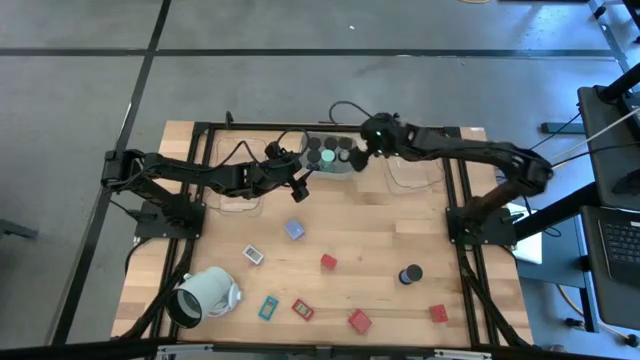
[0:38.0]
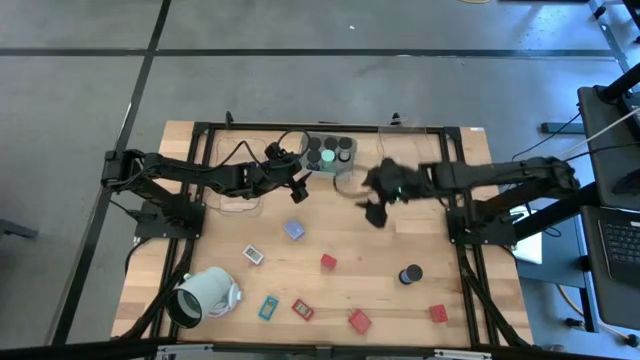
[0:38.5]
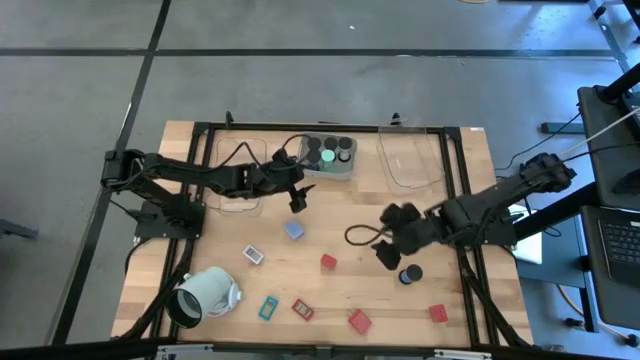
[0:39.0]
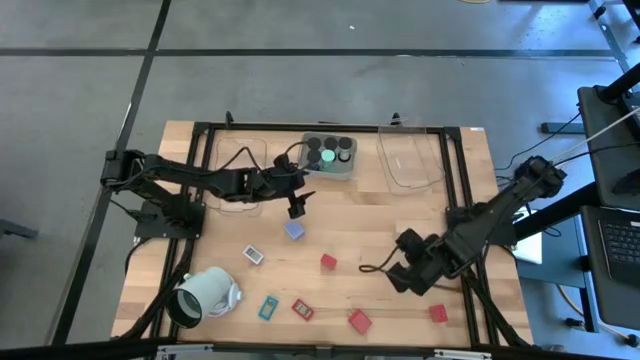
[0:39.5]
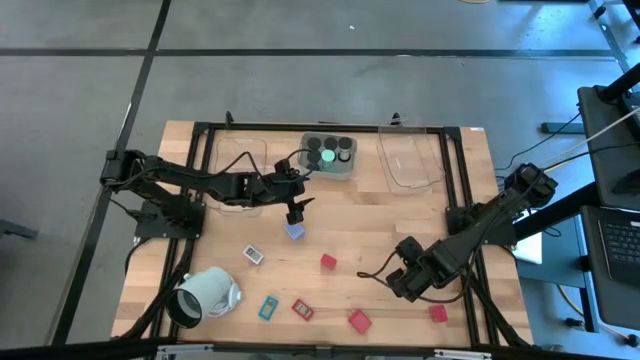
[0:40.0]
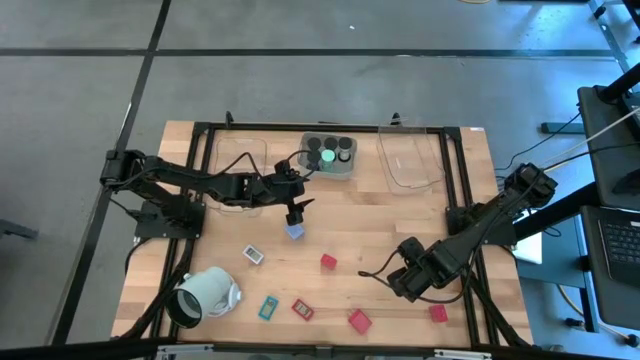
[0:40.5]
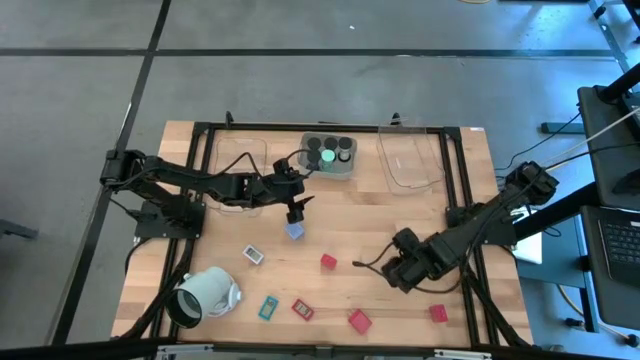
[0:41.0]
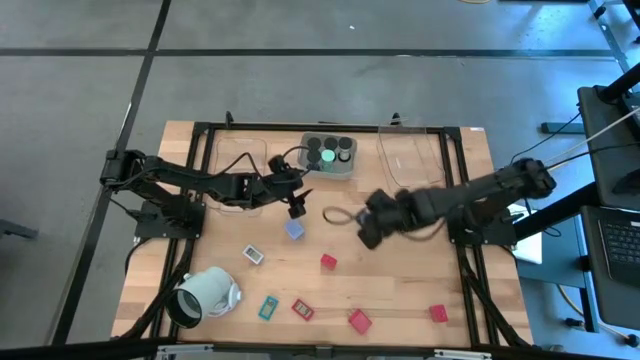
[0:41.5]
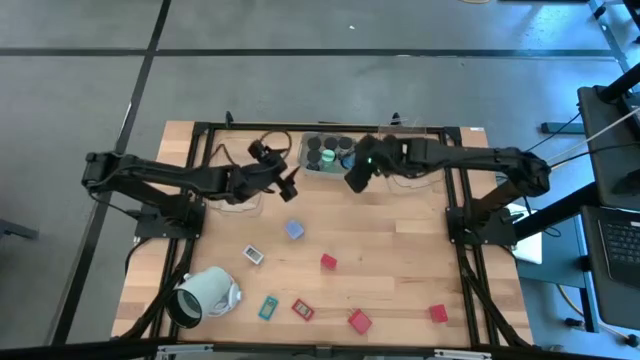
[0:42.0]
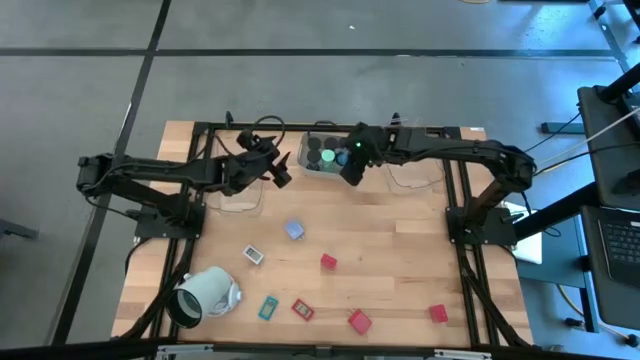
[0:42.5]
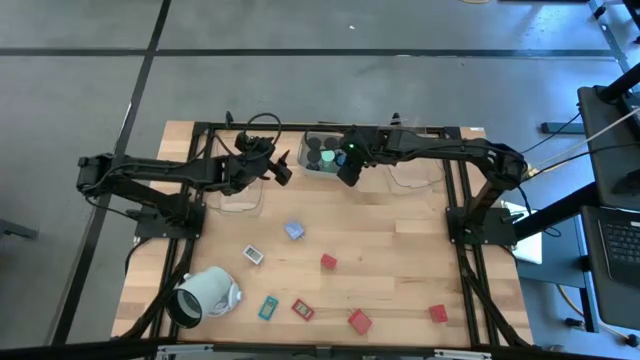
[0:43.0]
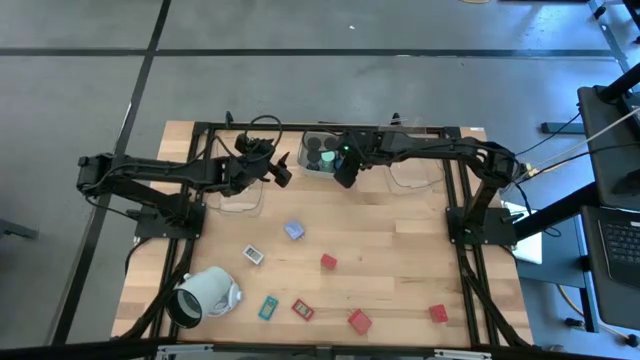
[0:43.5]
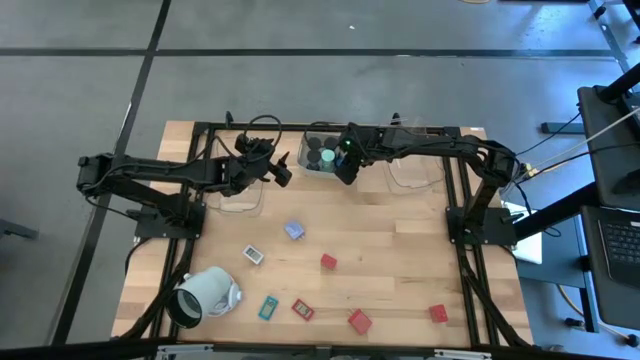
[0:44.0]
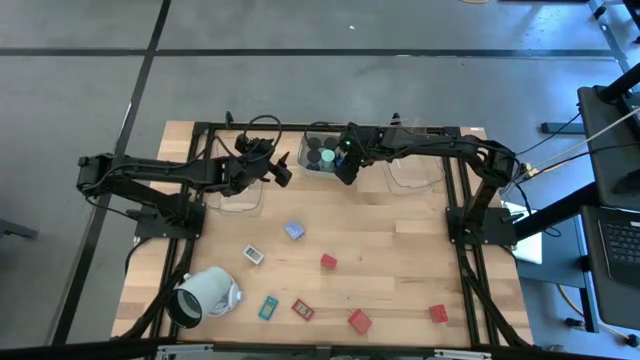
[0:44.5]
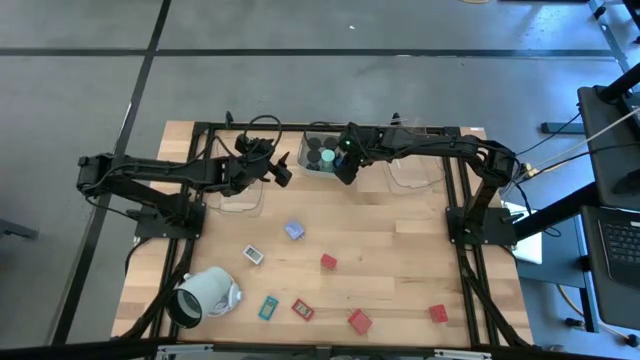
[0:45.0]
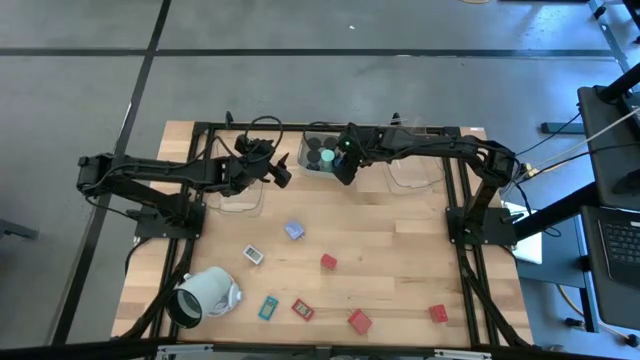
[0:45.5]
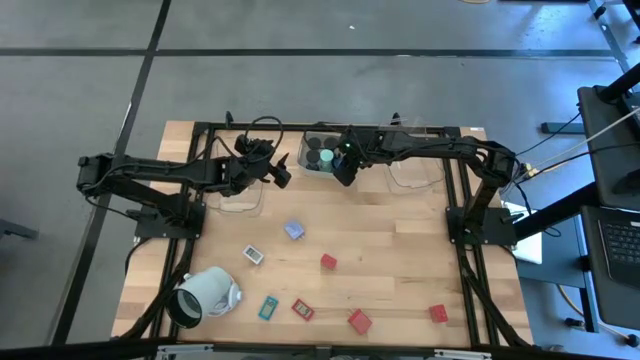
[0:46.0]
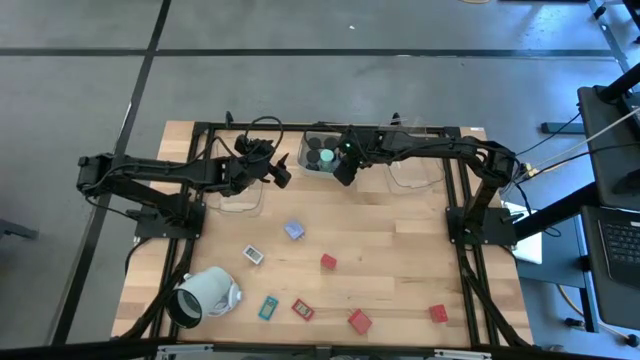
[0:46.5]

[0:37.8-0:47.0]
Task: Pick & Place Office items
Put the blue hourglass timer into the gray bin

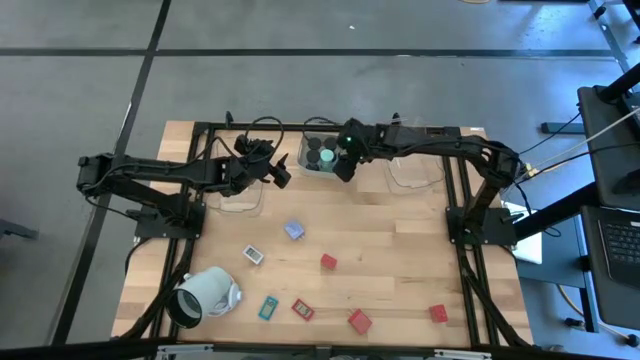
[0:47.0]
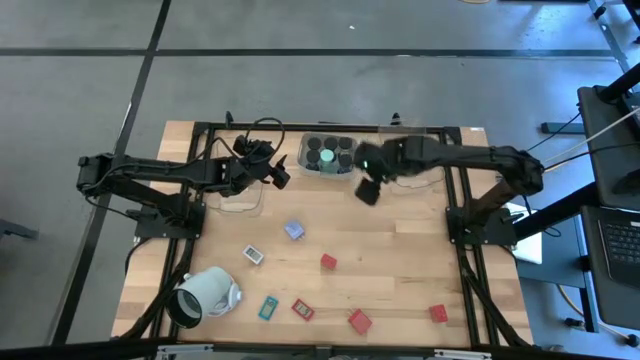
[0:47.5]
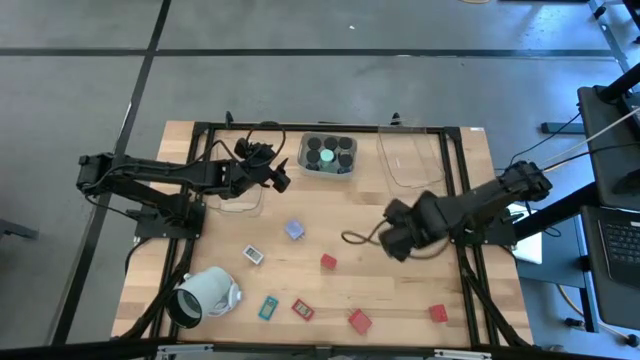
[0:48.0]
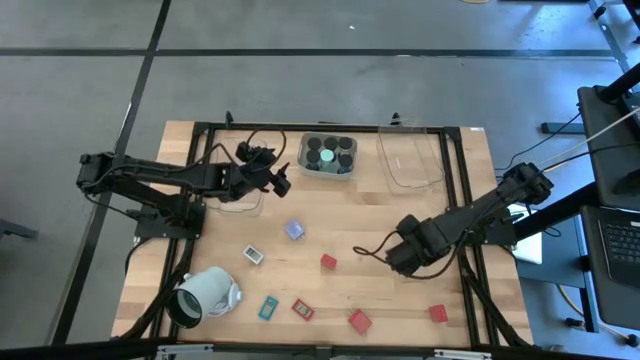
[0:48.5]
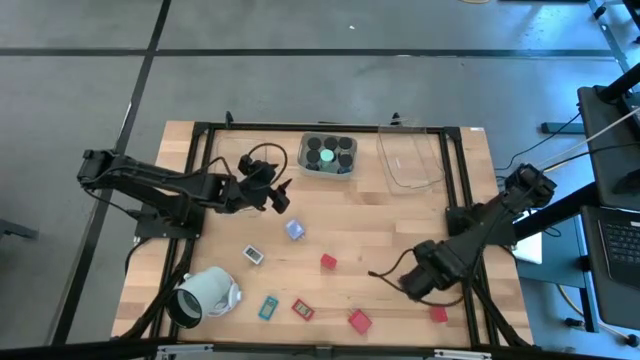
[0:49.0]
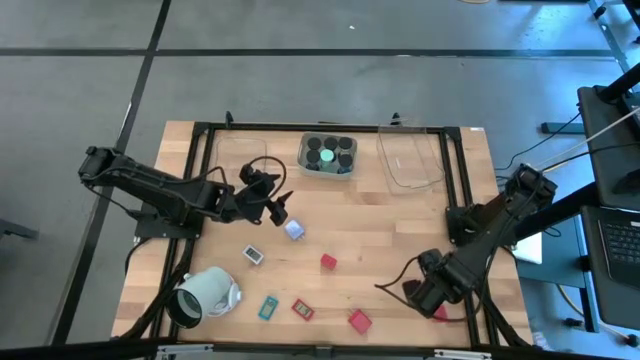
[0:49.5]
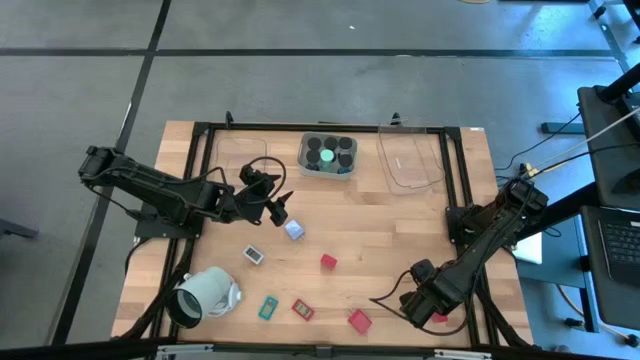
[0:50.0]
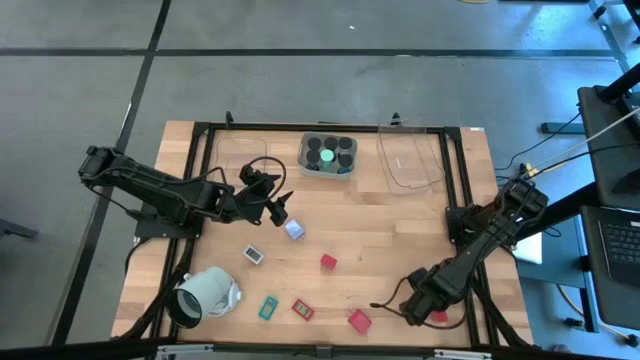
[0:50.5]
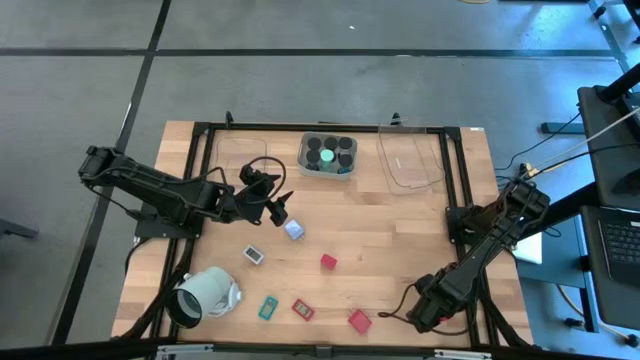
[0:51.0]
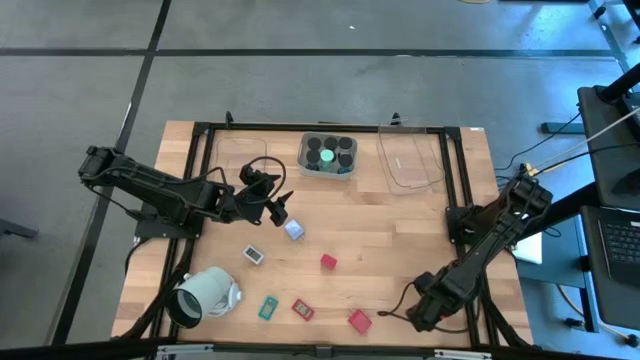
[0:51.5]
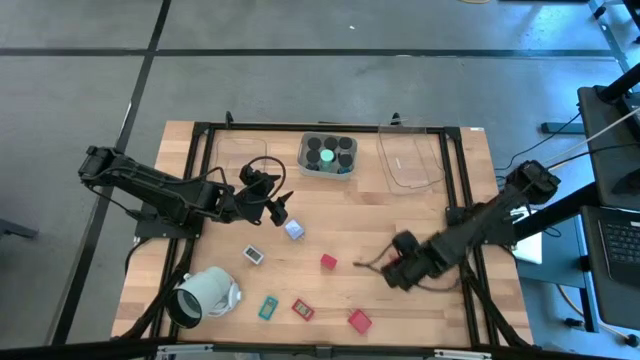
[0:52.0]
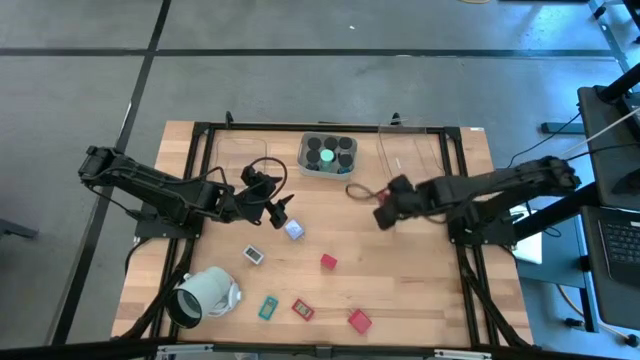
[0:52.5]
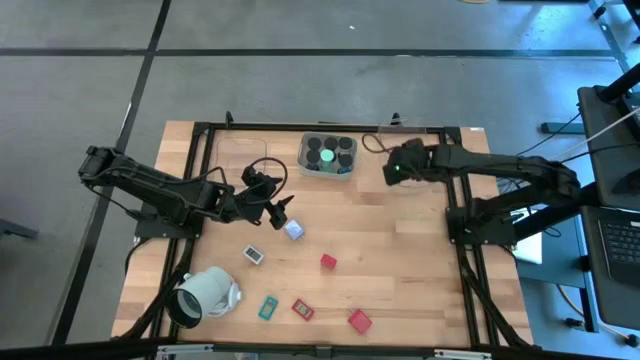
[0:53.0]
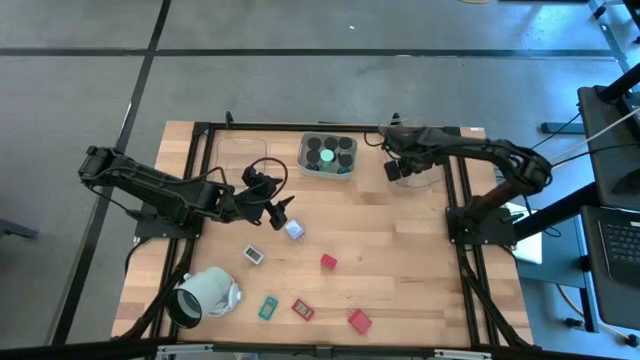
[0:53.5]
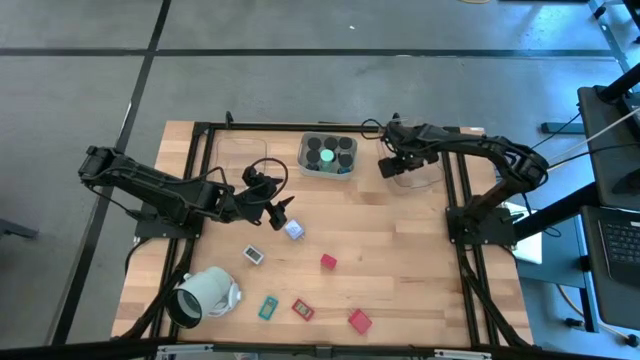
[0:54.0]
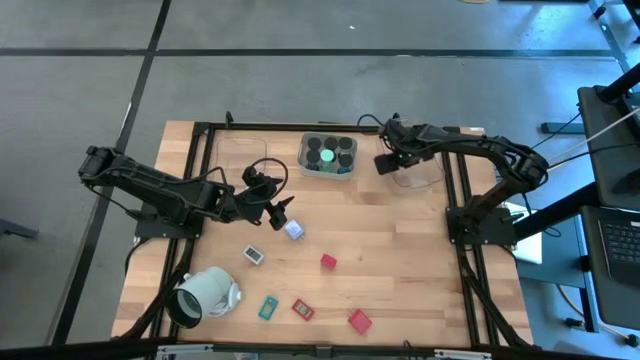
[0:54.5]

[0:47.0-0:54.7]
Put the bottom right red charger adapter into the right transparent bin

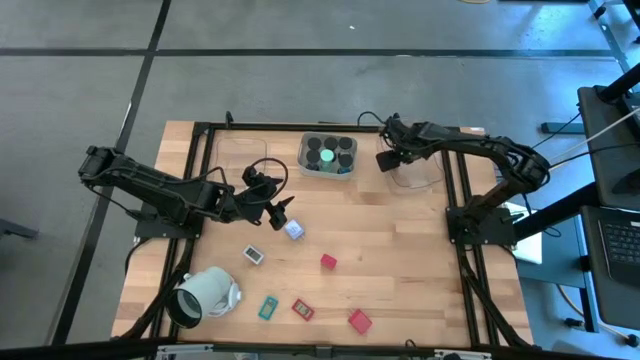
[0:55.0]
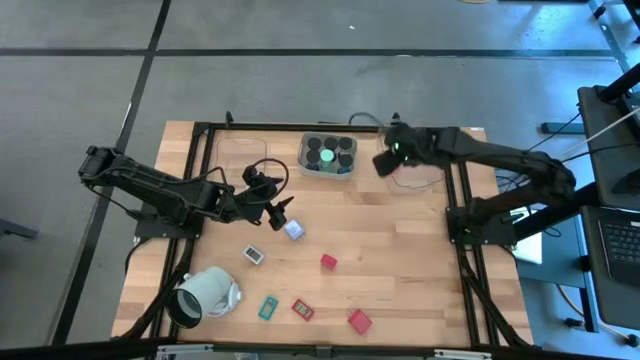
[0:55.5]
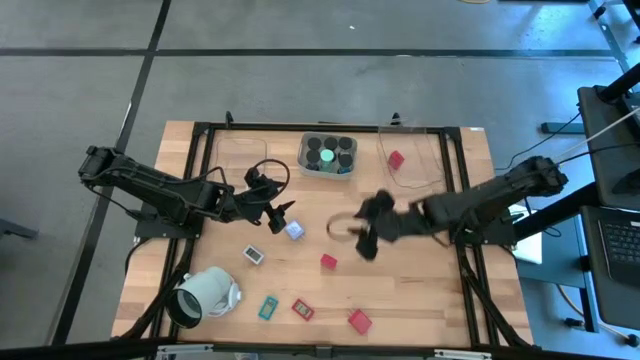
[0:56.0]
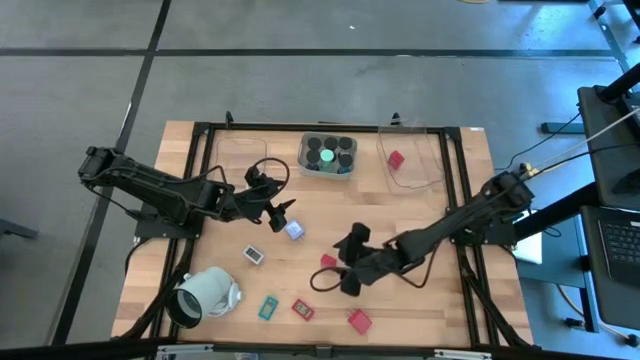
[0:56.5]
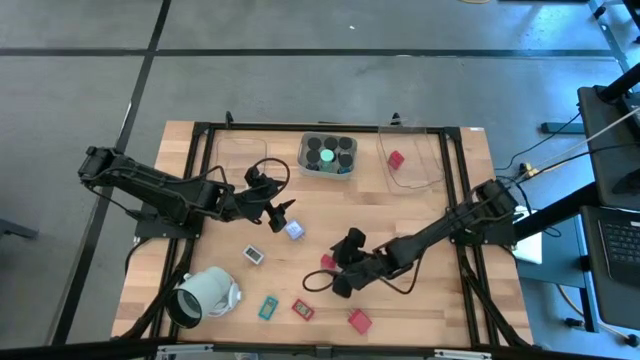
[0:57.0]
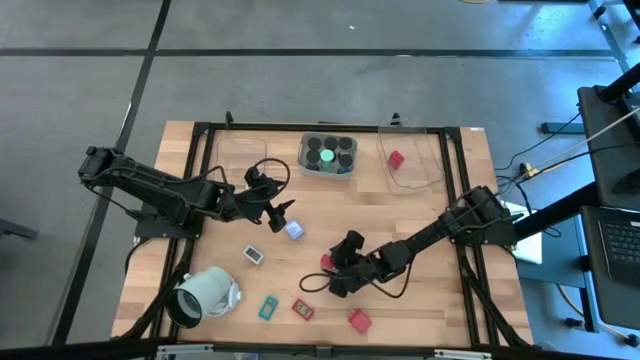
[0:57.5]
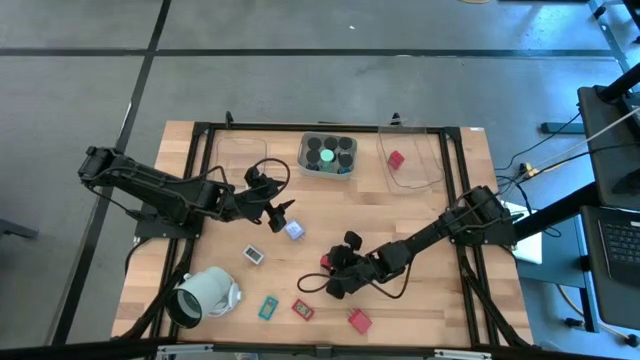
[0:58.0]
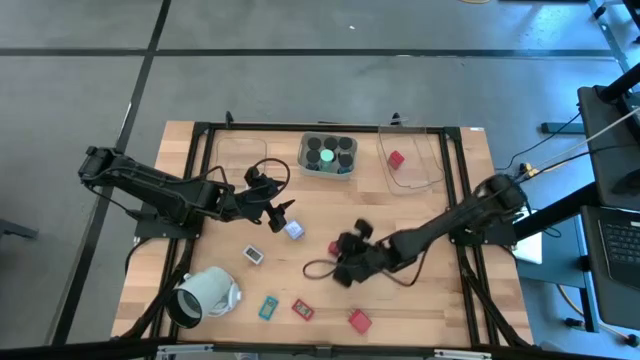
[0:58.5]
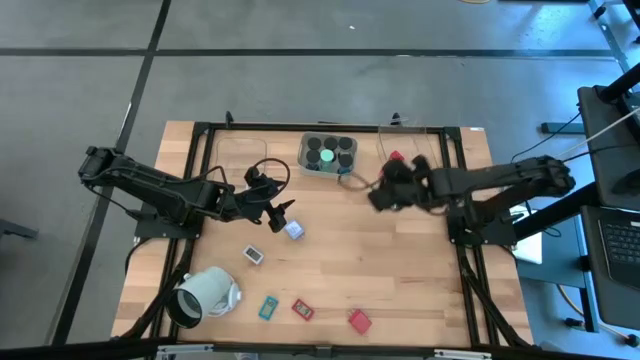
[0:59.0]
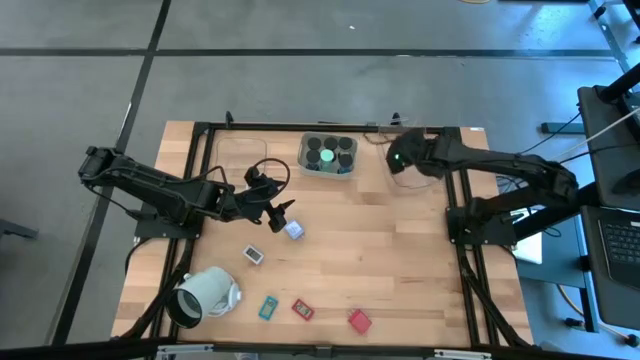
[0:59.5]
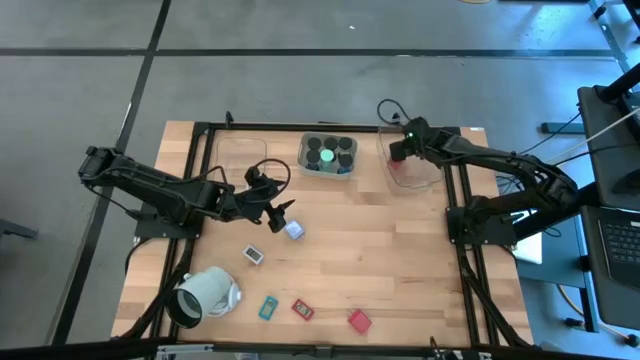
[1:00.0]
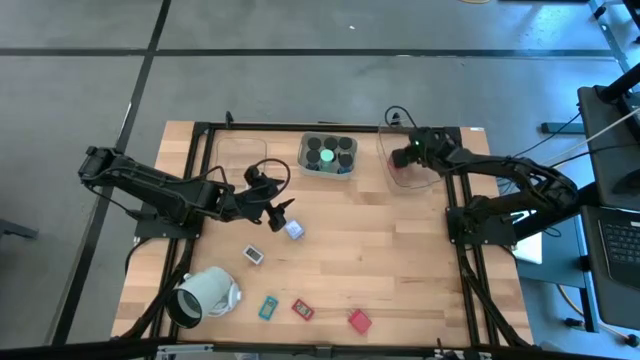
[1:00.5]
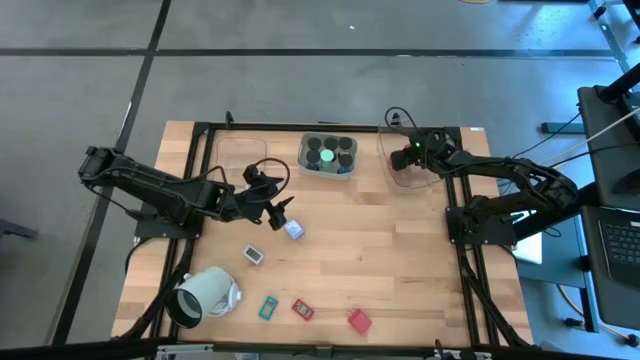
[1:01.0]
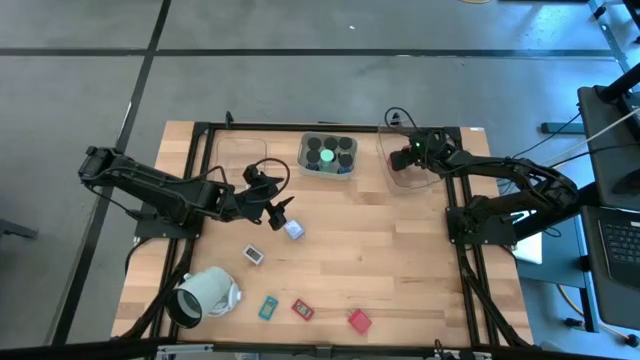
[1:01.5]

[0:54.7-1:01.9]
Put the top red charger adapter into the right transparent bin
